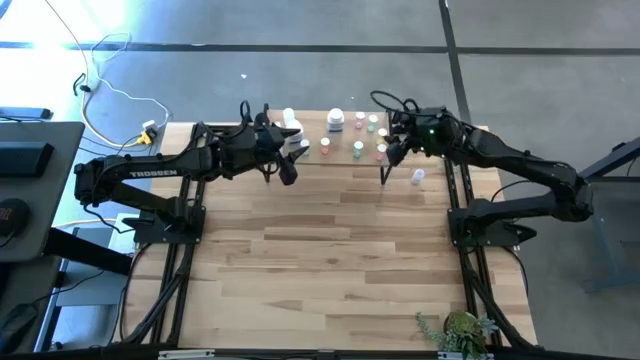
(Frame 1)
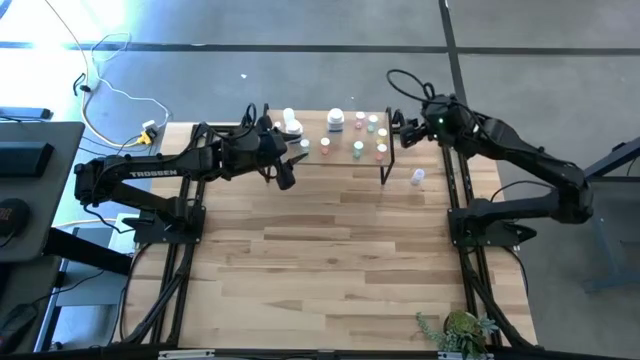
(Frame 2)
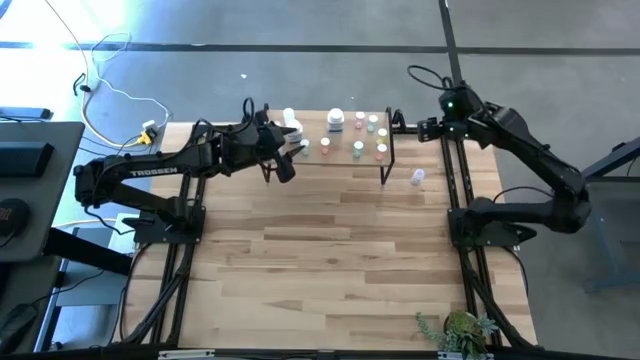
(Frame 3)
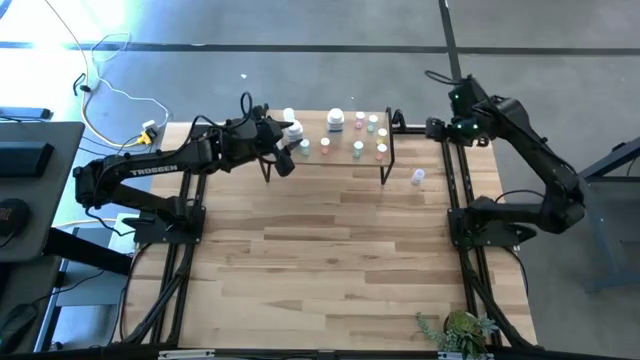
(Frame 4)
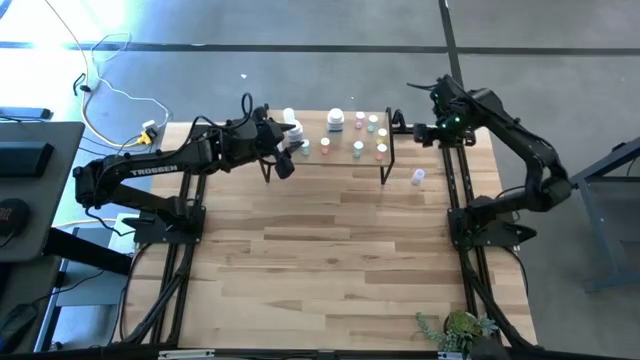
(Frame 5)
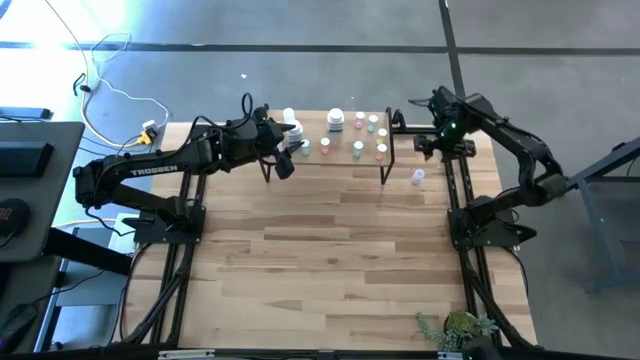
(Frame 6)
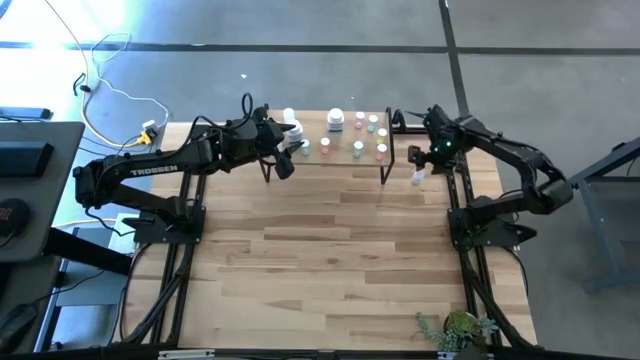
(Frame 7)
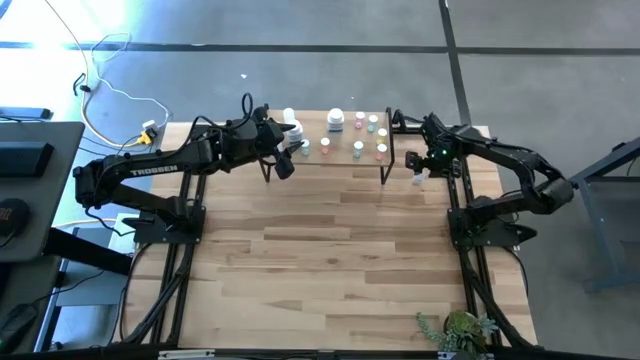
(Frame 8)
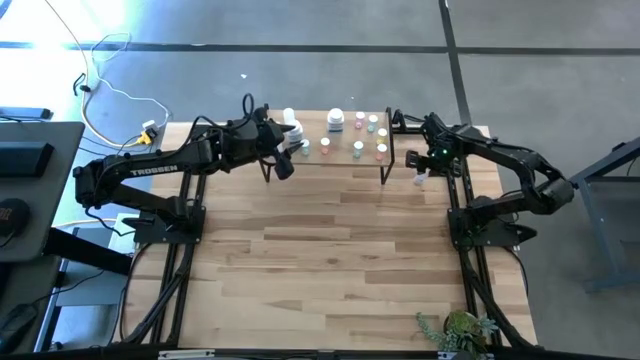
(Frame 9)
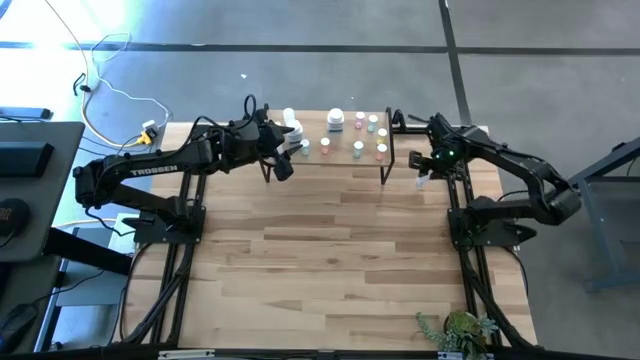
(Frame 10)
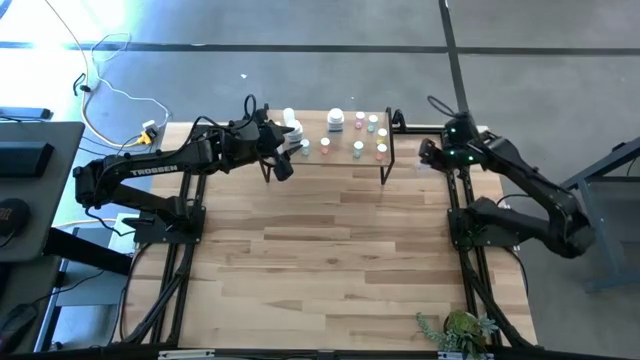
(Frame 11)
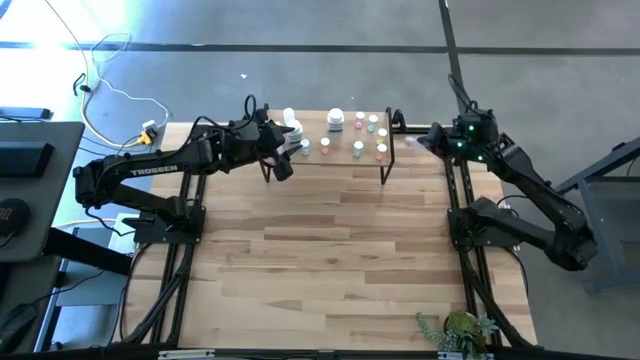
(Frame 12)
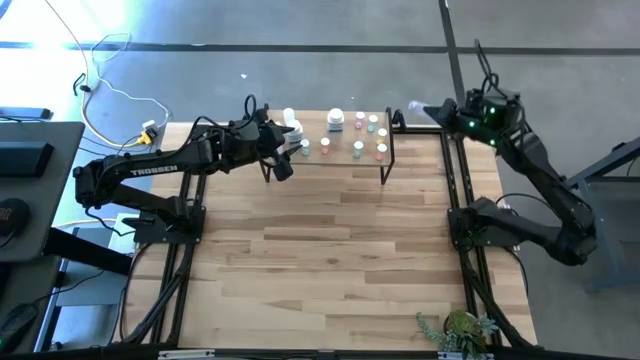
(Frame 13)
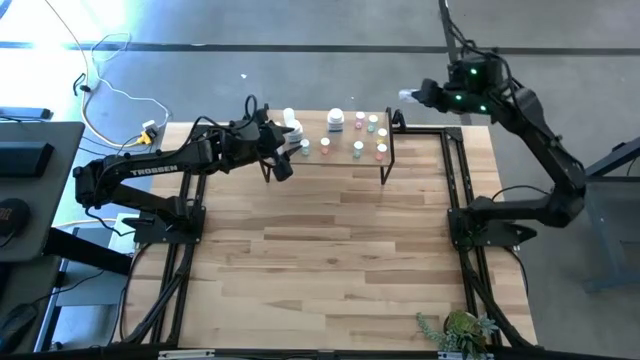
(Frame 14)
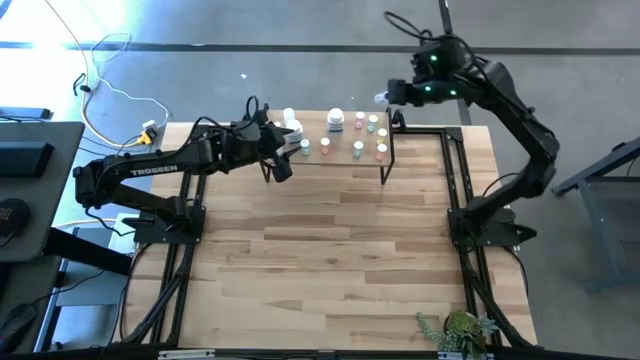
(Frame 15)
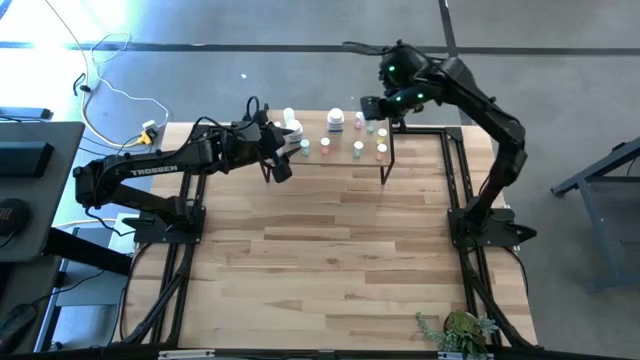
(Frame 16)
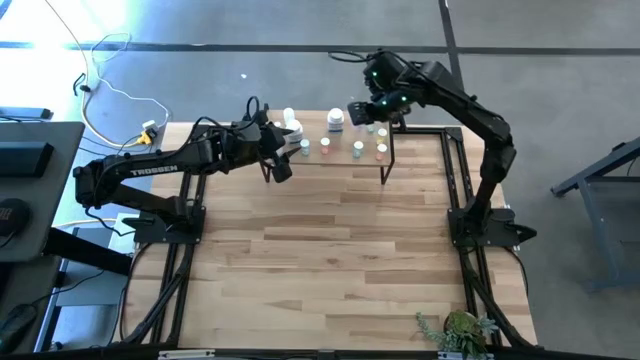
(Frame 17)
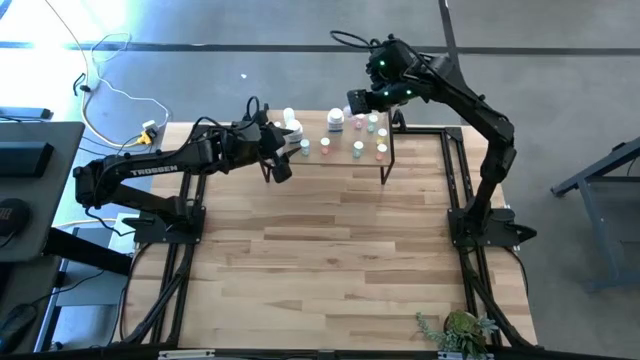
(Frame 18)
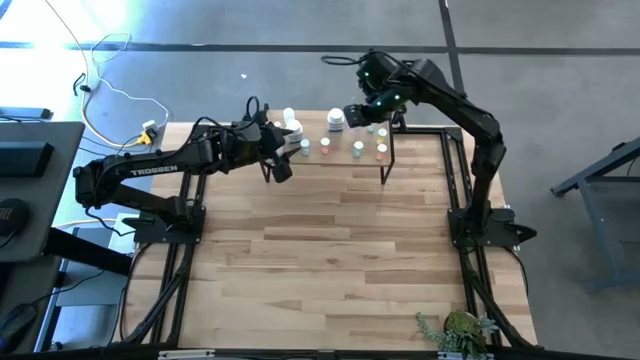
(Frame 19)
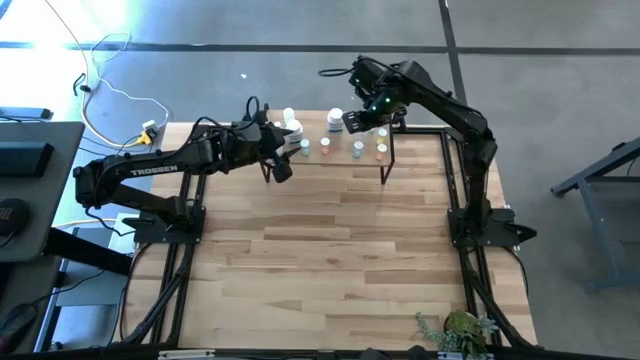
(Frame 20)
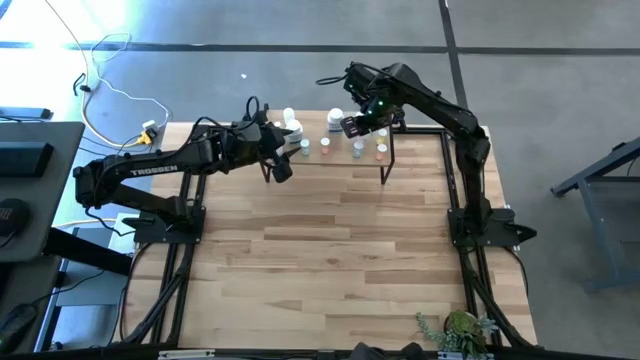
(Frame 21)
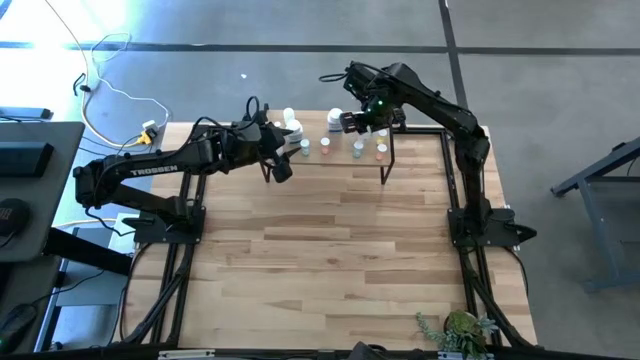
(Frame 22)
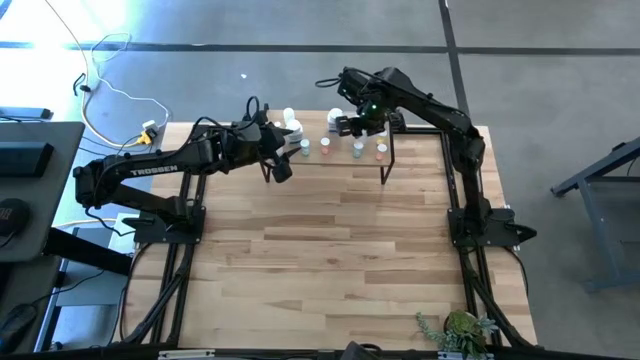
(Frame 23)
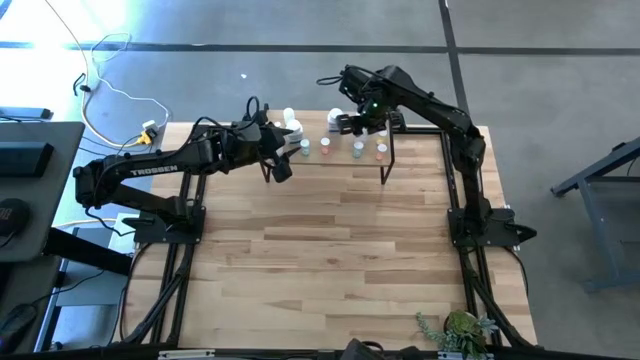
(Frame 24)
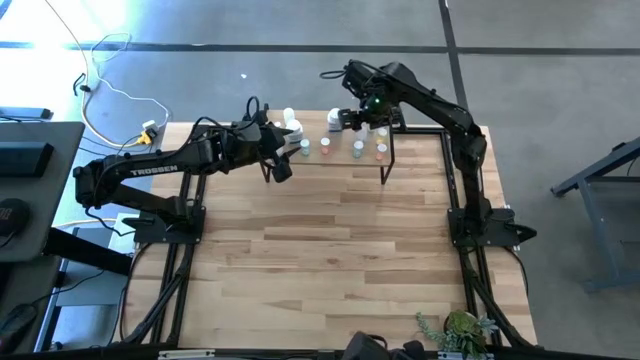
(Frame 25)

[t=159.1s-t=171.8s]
Task: Pick and place medicine bottles onto shelf by color
Put the transparent pill bottle on the shelf

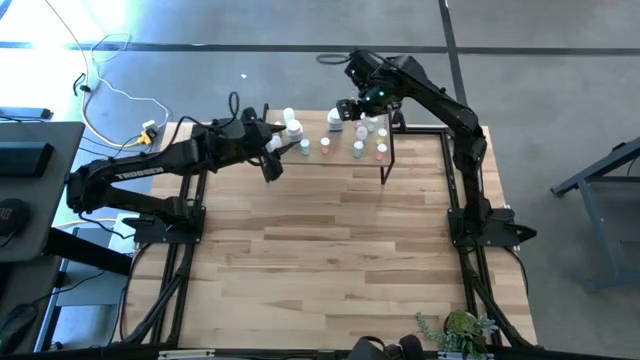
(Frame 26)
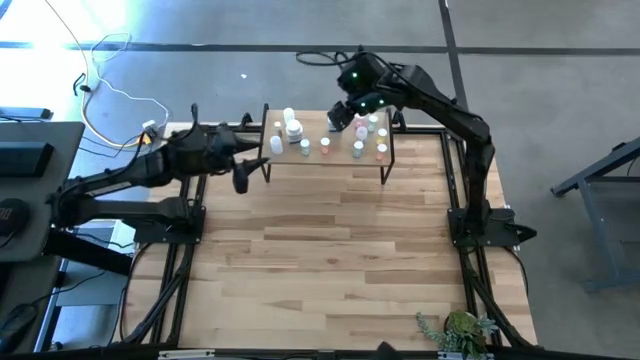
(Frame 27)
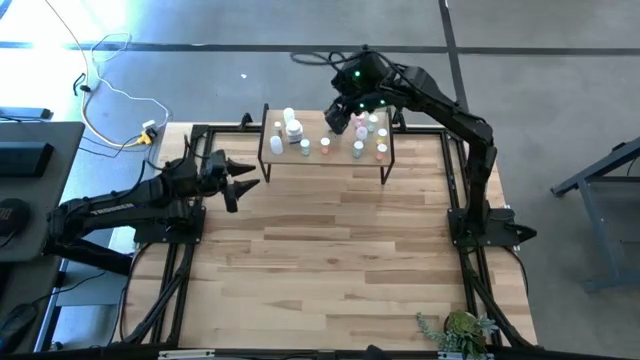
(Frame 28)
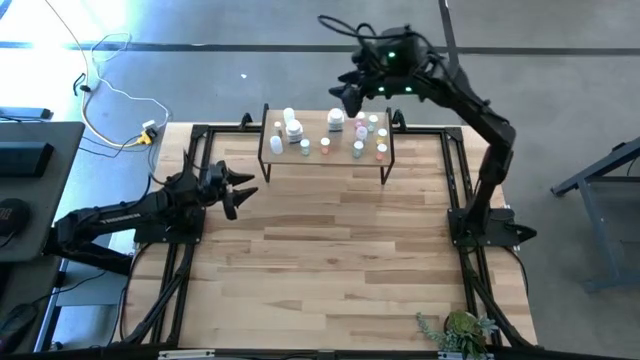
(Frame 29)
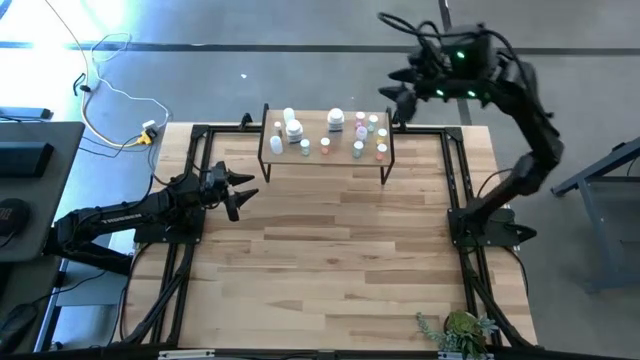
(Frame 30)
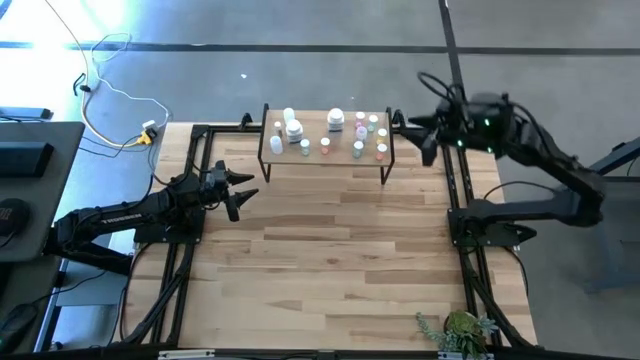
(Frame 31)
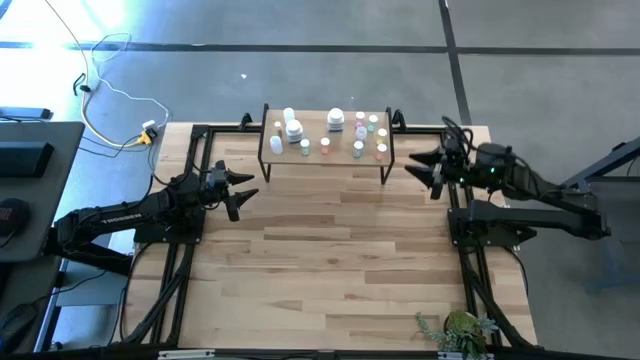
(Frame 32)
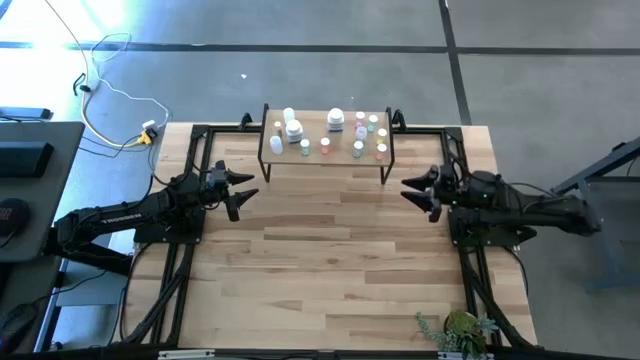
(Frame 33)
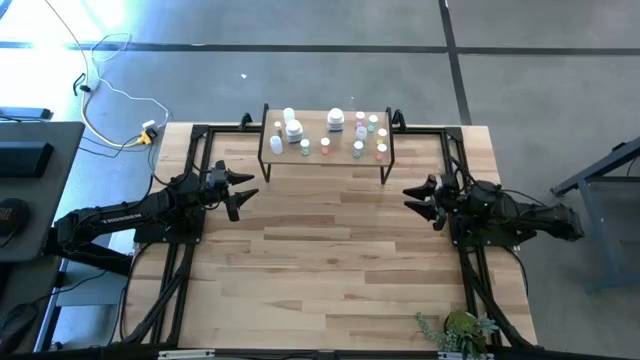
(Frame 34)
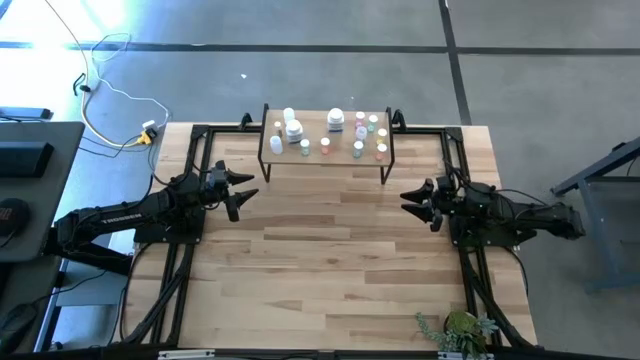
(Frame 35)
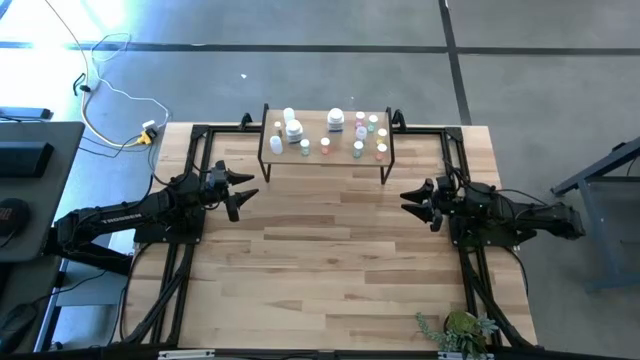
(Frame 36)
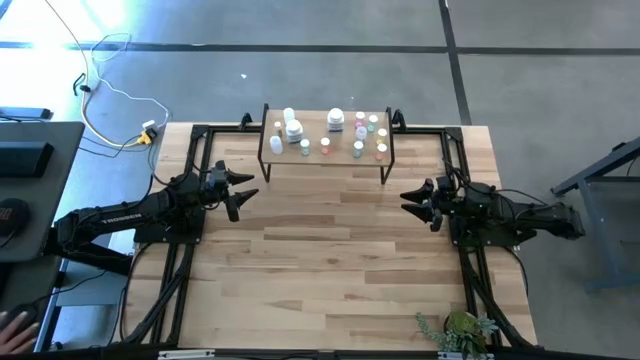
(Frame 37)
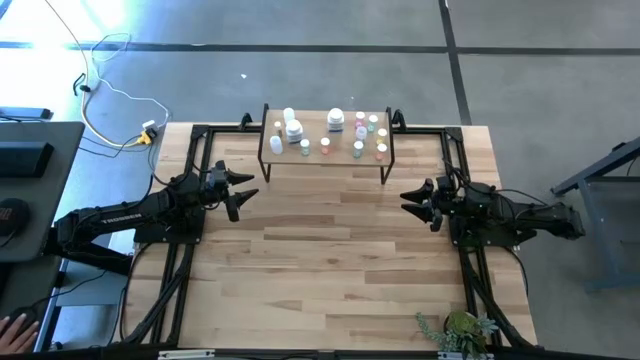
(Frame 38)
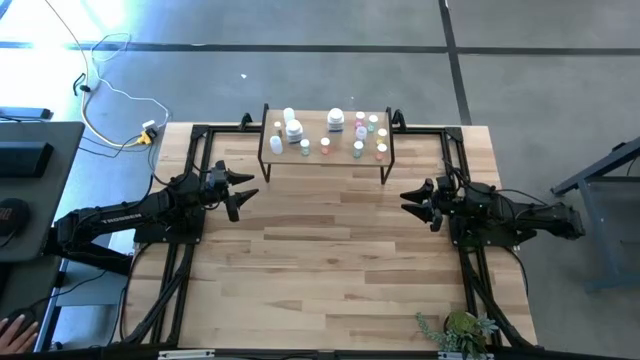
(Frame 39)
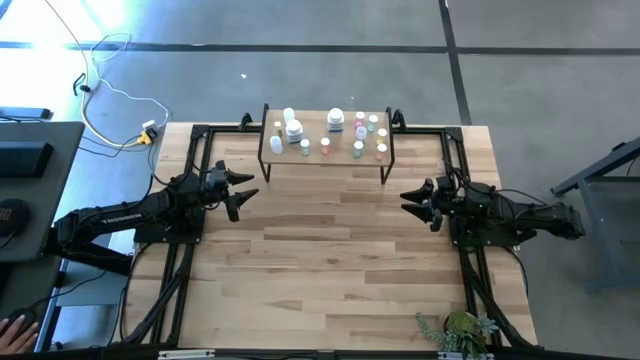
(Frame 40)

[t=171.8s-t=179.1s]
Return to Home Position
